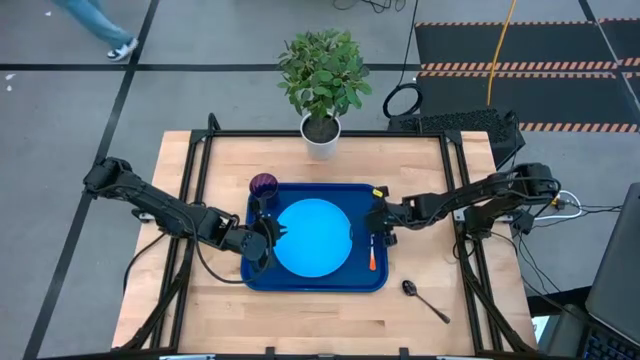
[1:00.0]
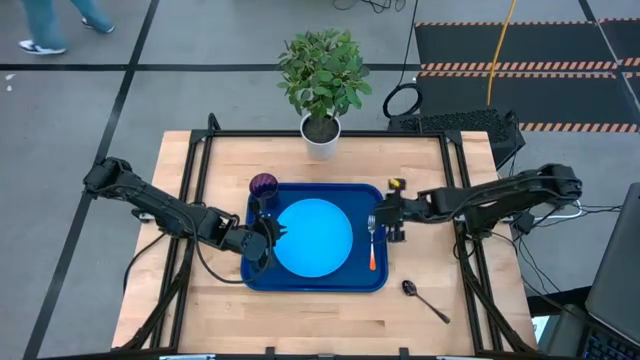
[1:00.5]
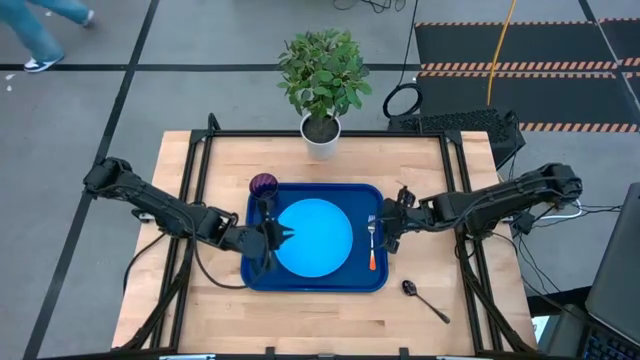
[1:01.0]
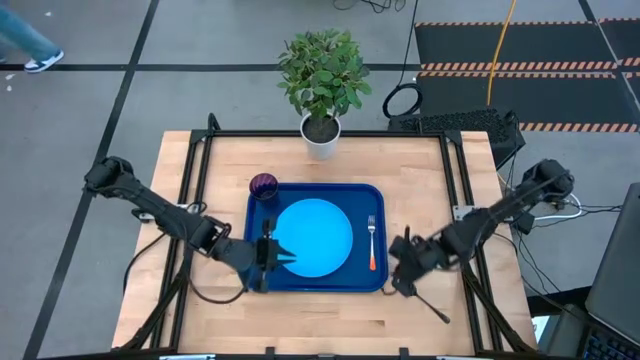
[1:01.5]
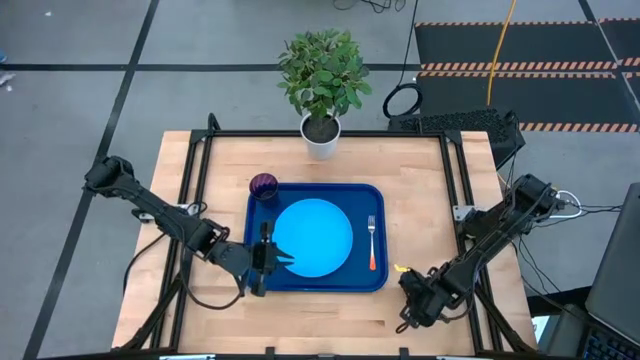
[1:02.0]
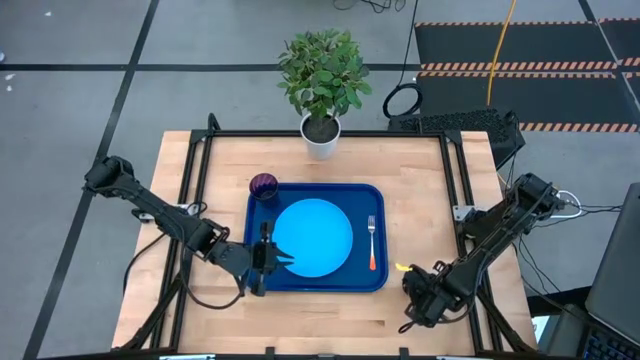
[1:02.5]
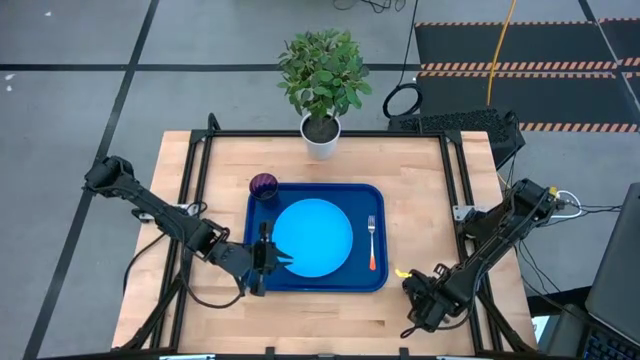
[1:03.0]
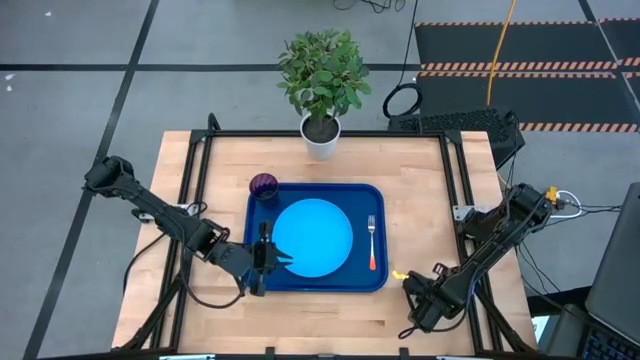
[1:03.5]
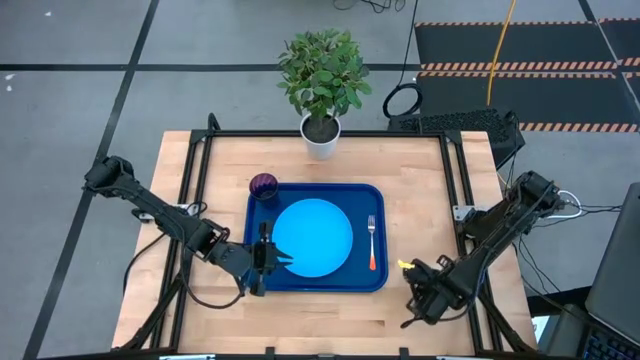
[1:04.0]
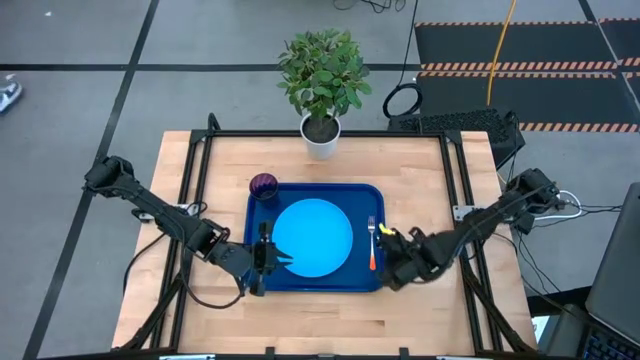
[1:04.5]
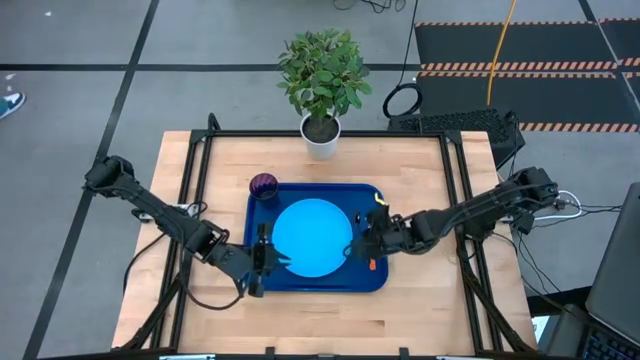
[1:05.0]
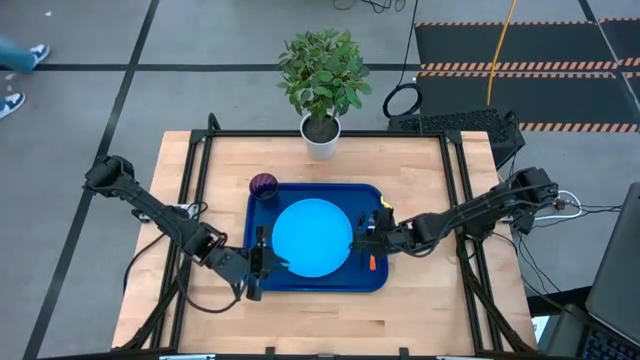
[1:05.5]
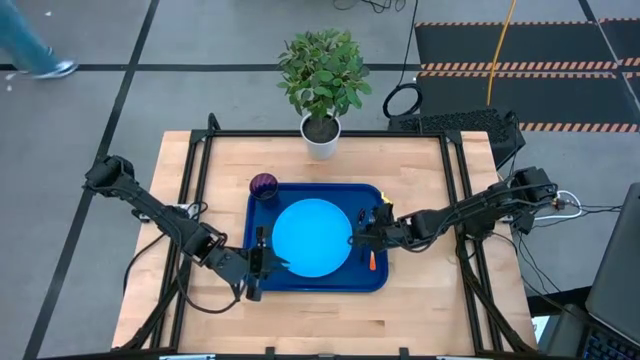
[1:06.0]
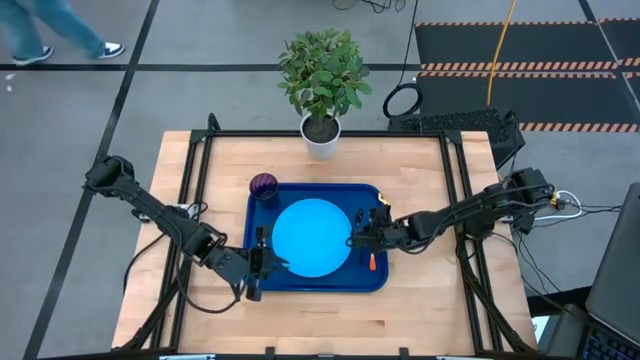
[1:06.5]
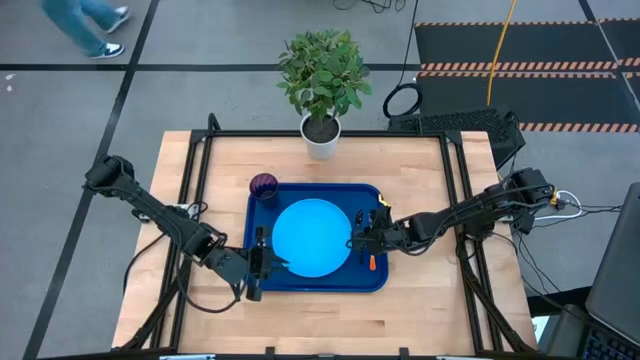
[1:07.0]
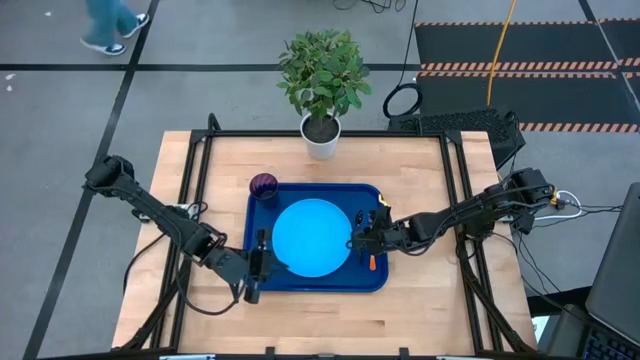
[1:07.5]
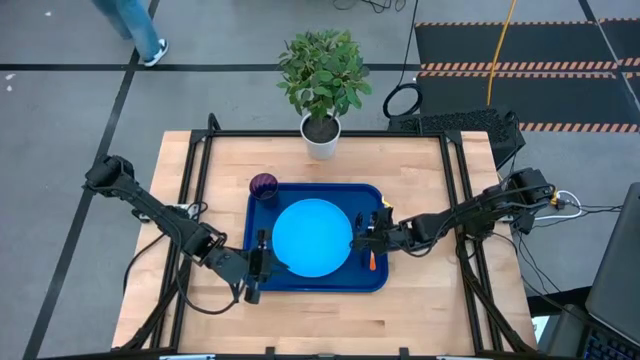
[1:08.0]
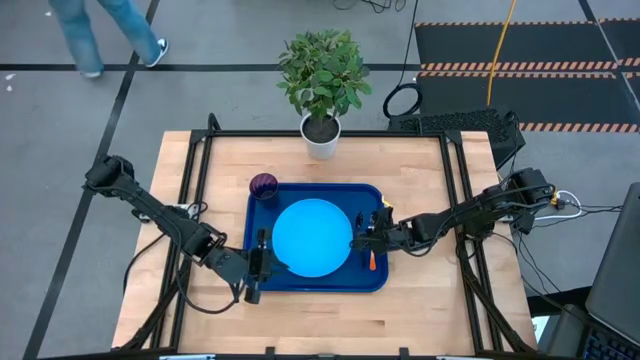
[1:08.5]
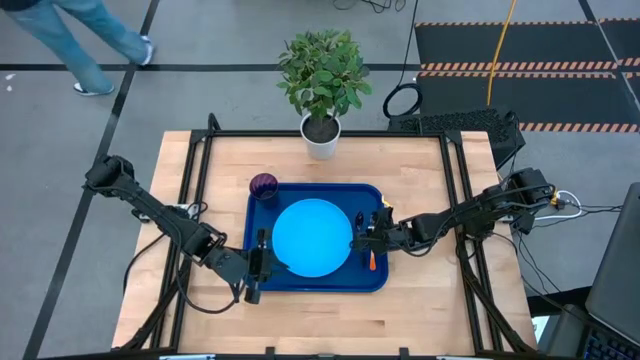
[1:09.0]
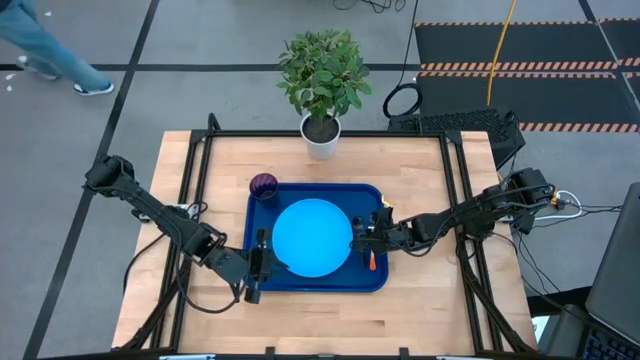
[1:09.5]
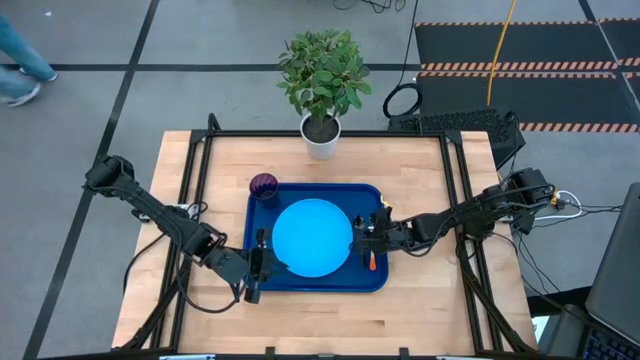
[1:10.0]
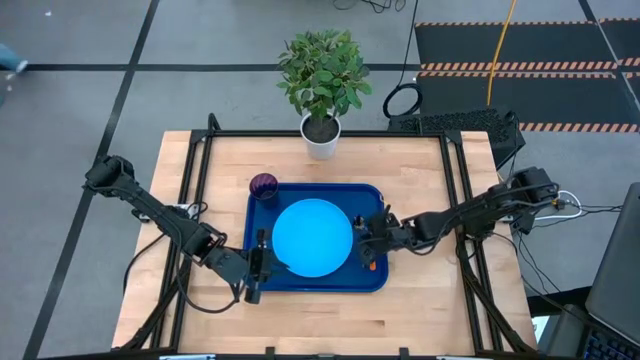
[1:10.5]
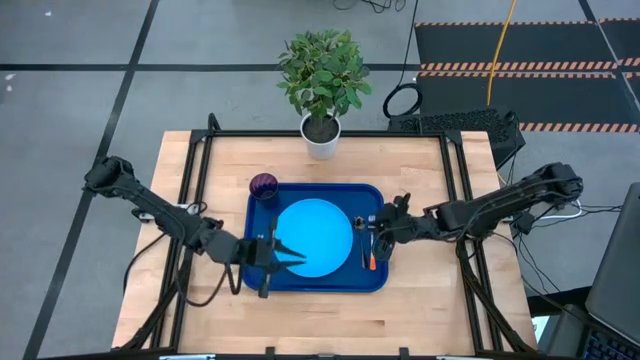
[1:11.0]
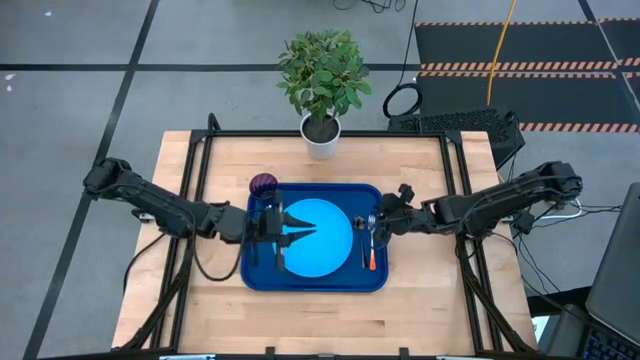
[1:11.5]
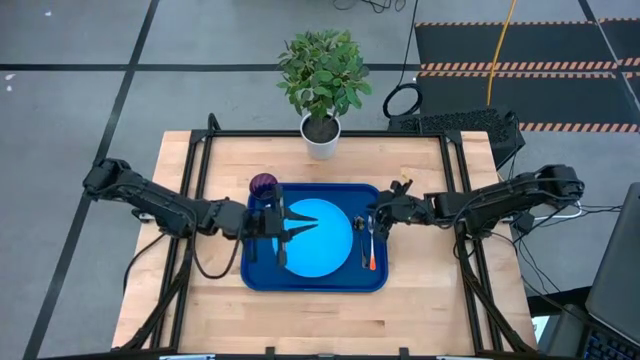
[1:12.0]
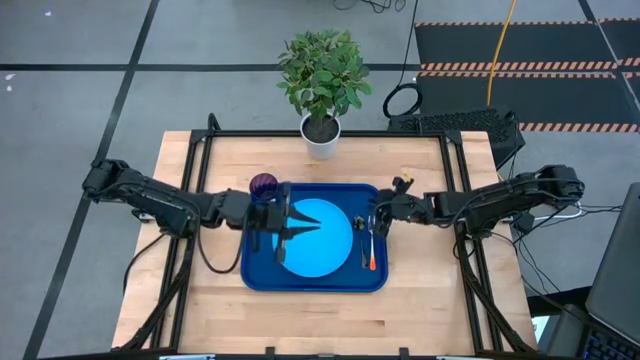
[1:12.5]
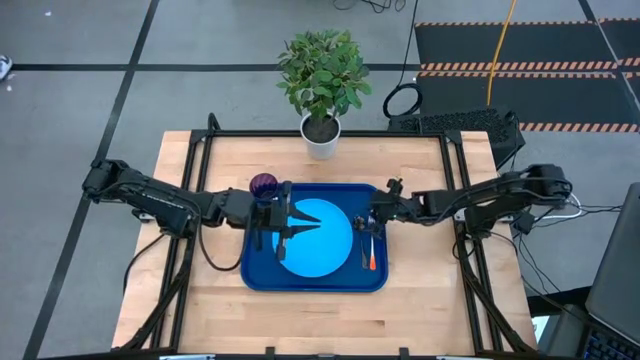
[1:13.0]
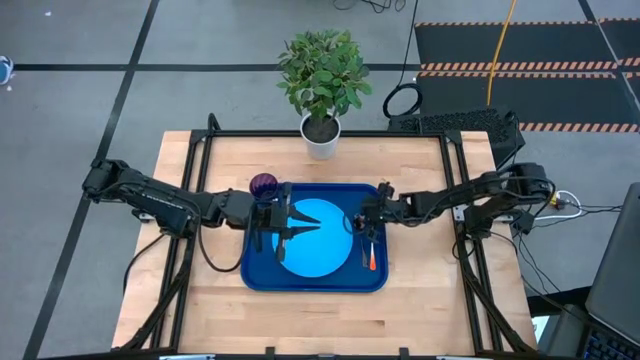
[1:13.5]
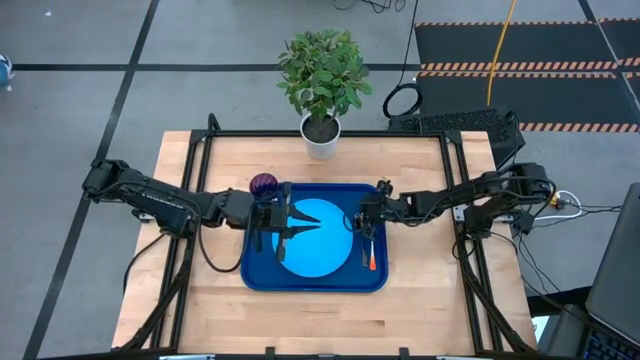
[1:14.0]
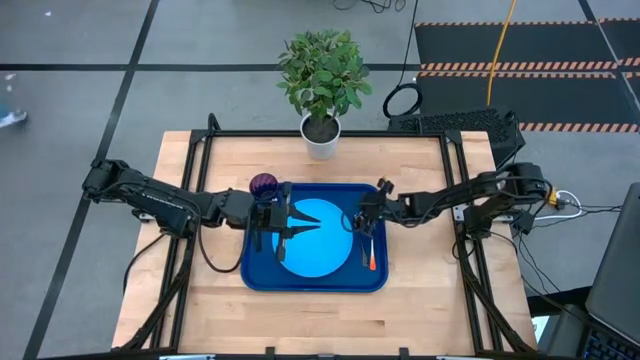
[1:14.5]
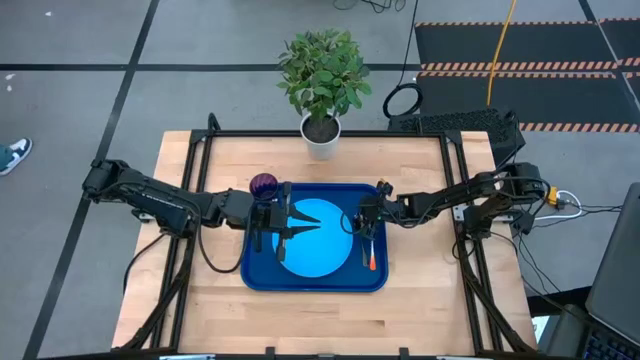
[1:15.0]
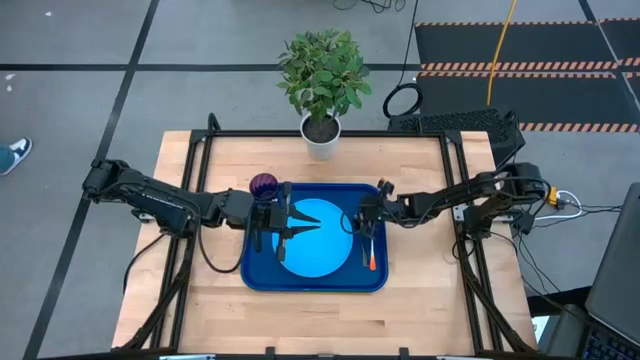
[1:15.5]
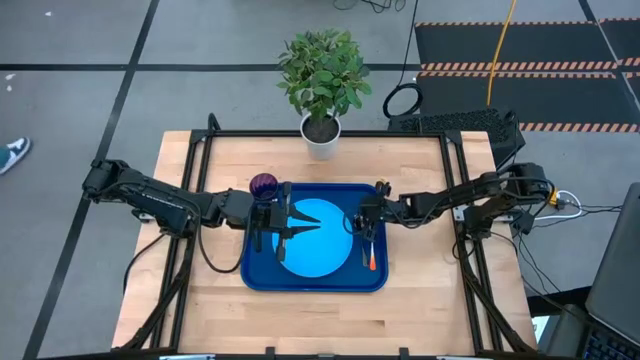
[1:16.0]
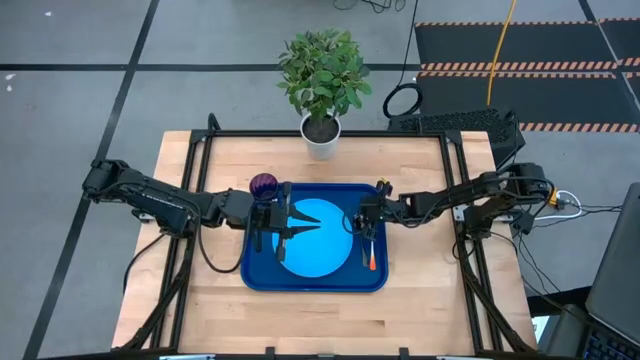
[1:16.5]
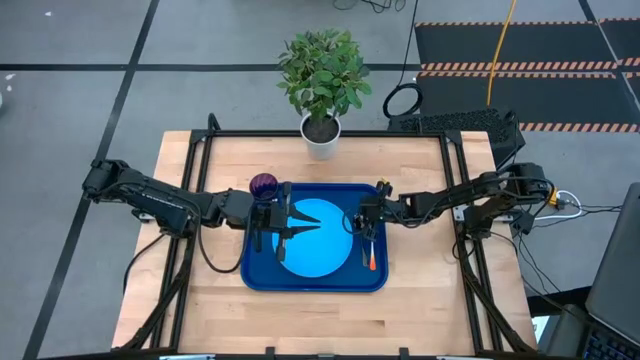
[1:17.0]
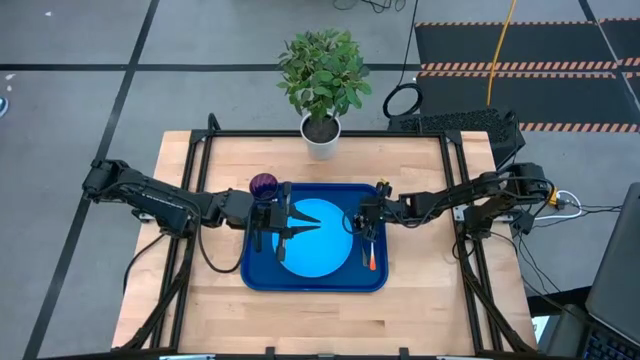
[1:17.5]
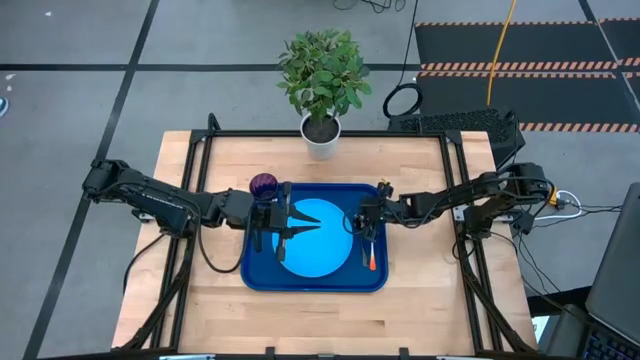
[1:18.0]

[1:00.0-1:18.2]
Task: Pick and place plate/cup/fork/spoon on tray
Put the black spoon on the blue tray to the right of the light blue plate

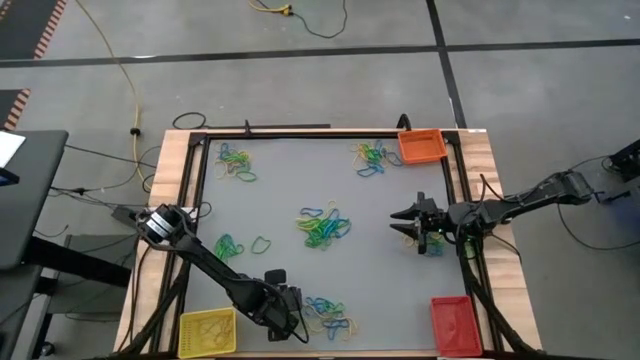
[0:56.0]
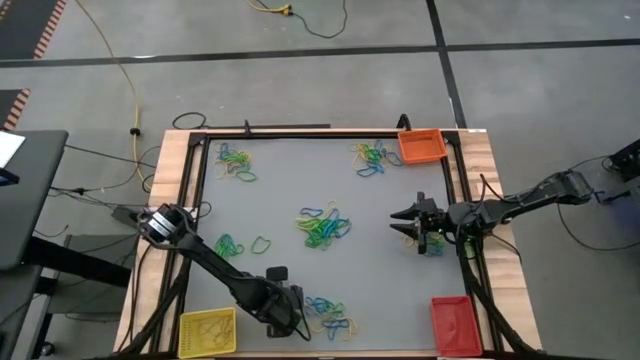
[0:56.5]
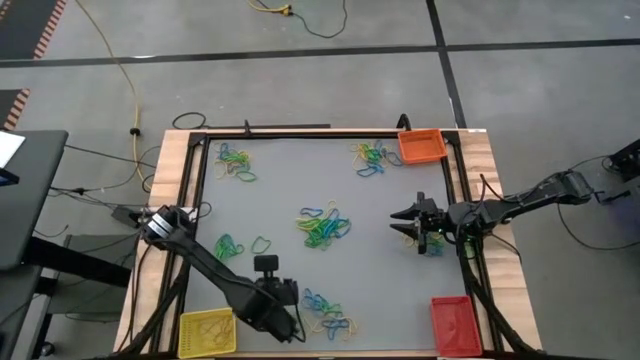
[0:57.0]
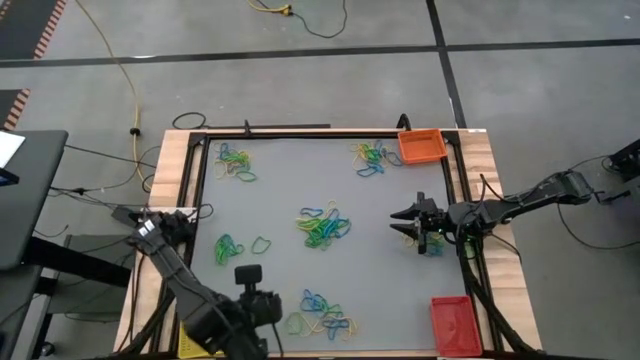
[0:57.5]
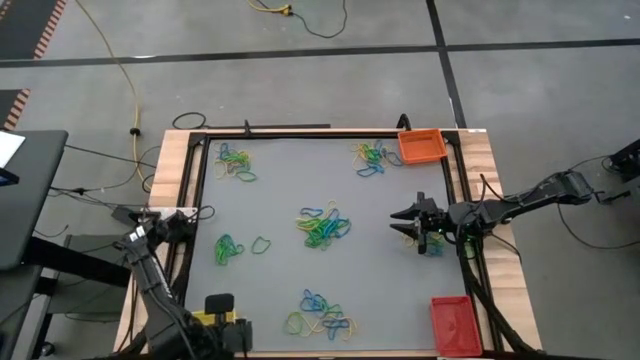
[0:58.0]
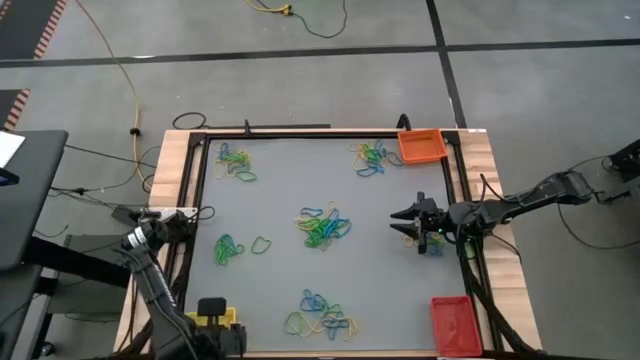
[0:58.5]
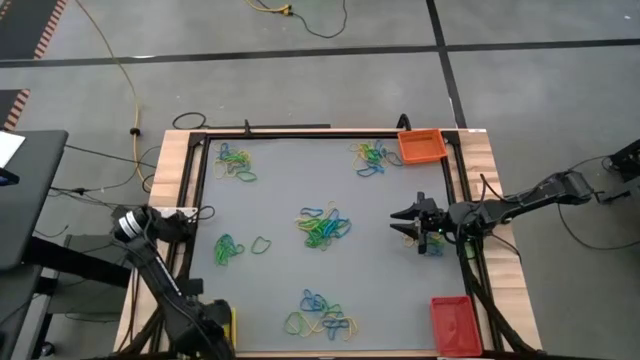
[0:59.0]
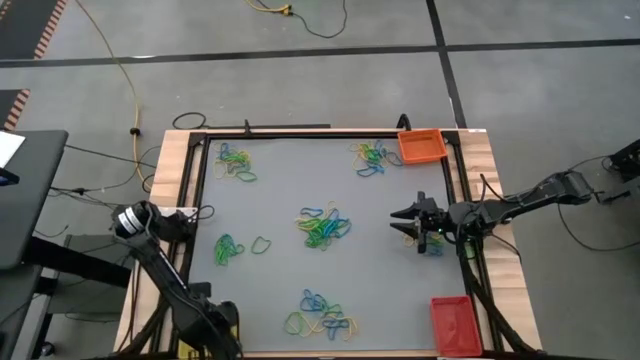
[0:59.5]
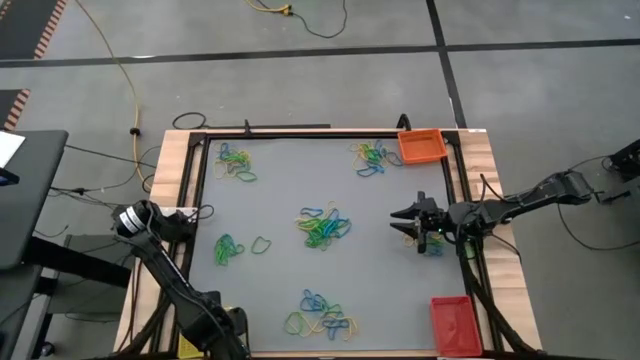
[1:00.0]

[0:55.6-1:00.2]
Task: Sort rubber bands into baskets
Put the yellow rubber band into the yellow bin
